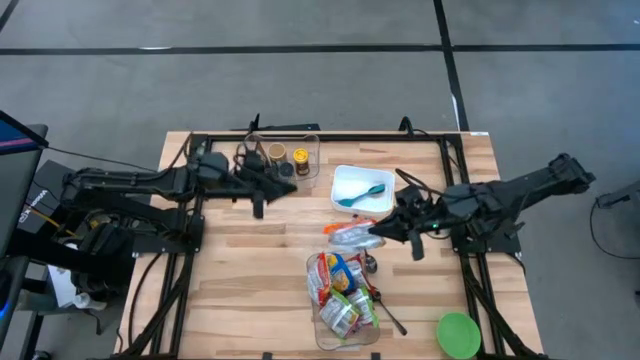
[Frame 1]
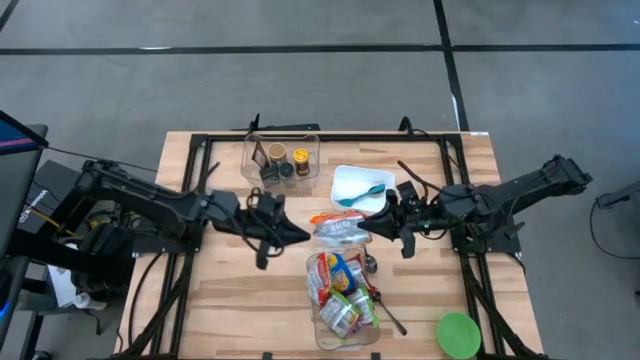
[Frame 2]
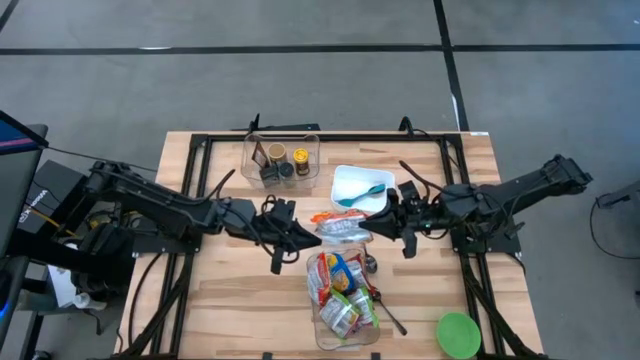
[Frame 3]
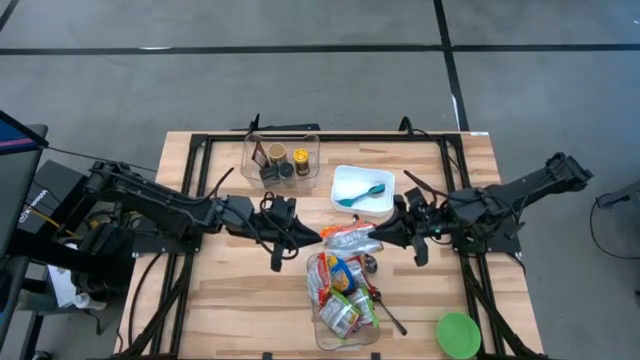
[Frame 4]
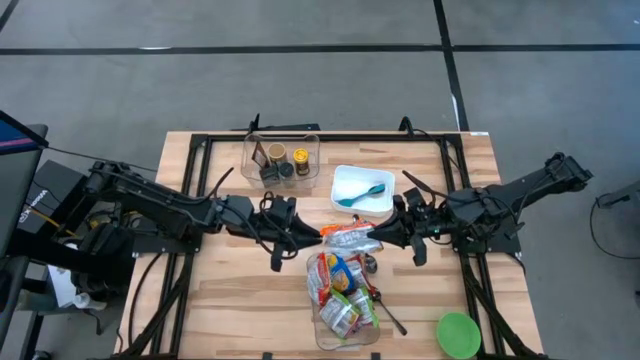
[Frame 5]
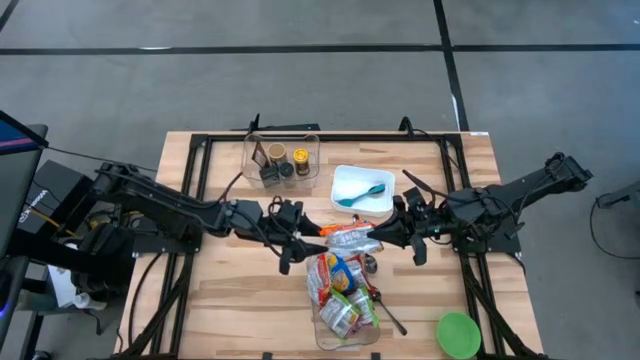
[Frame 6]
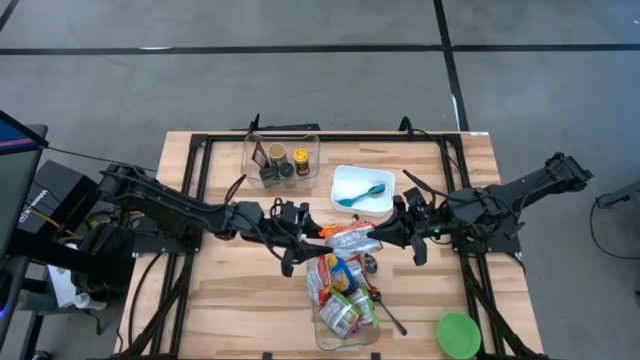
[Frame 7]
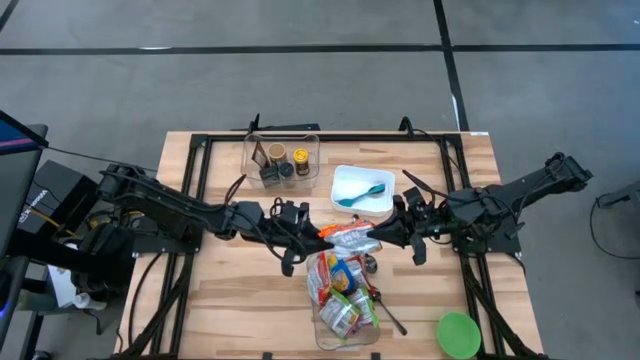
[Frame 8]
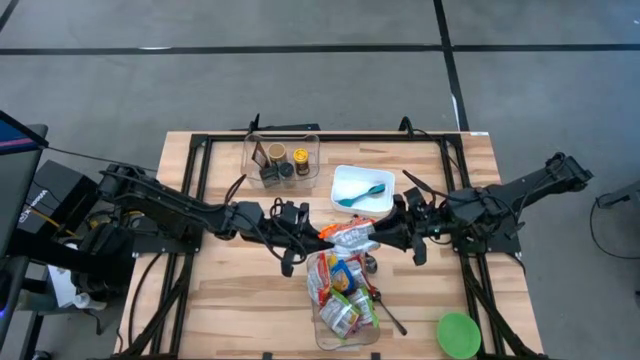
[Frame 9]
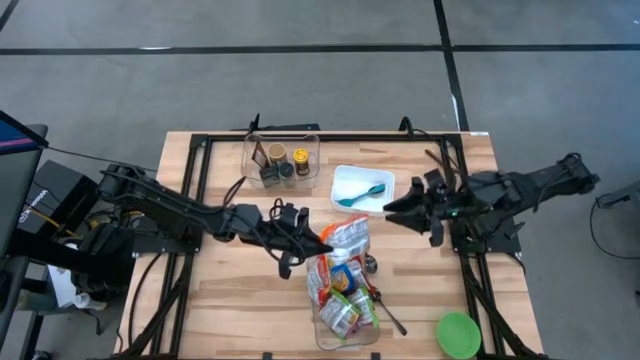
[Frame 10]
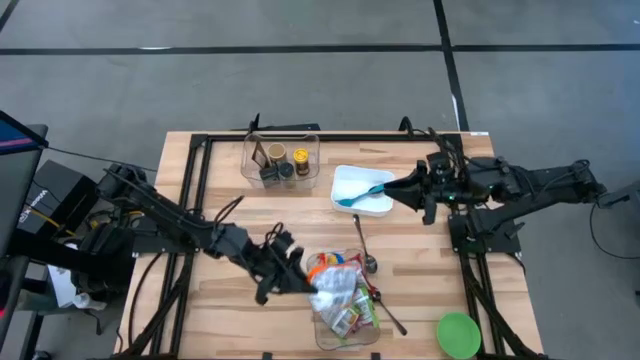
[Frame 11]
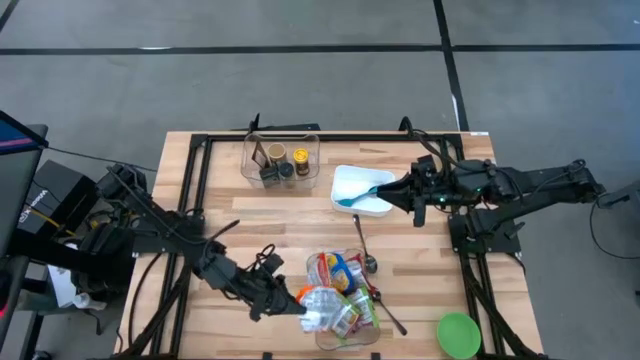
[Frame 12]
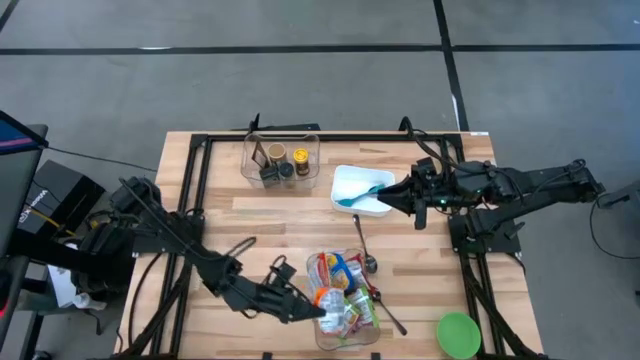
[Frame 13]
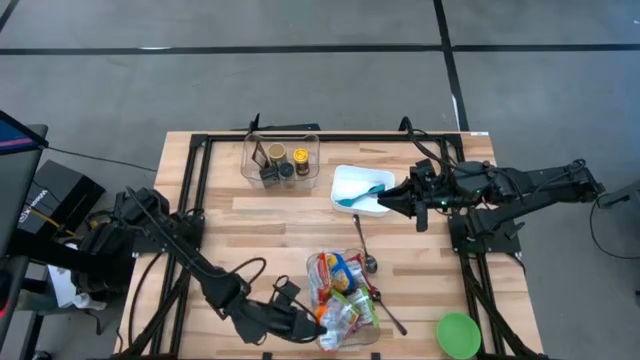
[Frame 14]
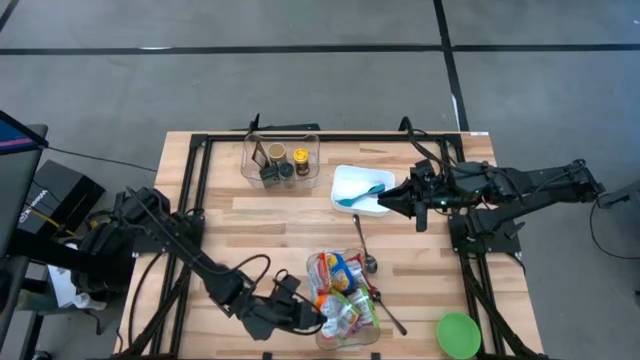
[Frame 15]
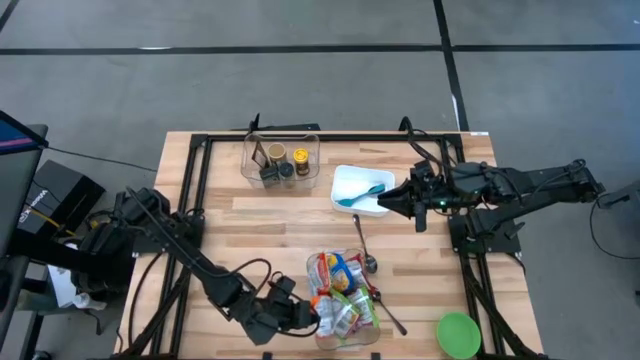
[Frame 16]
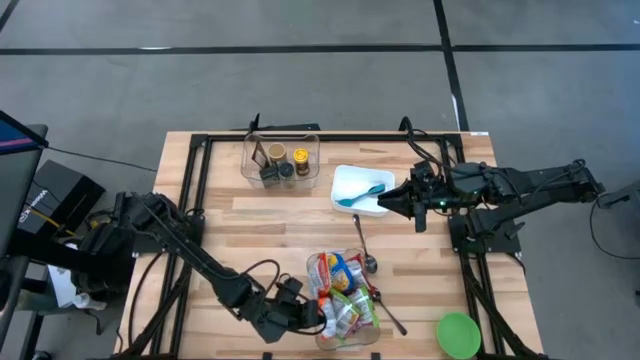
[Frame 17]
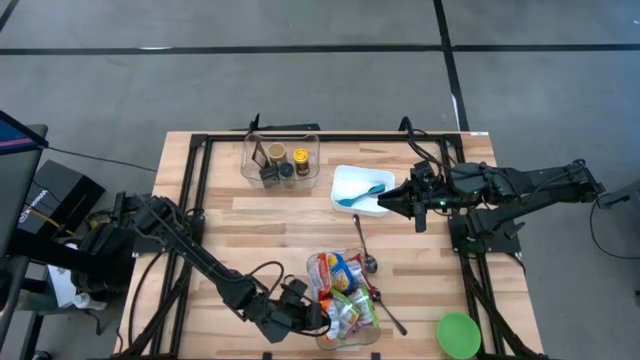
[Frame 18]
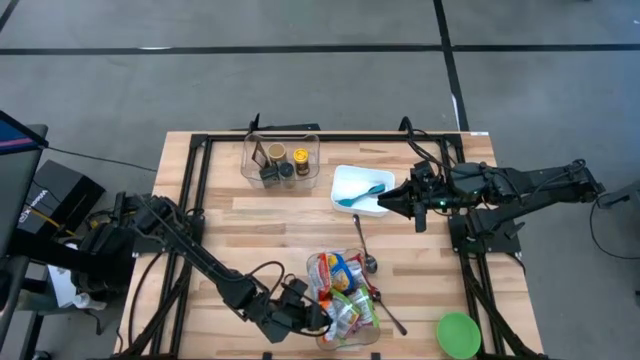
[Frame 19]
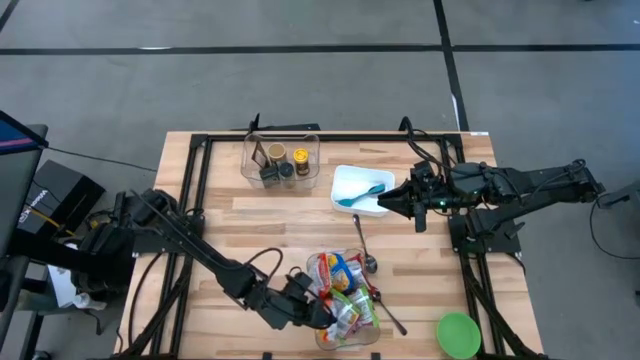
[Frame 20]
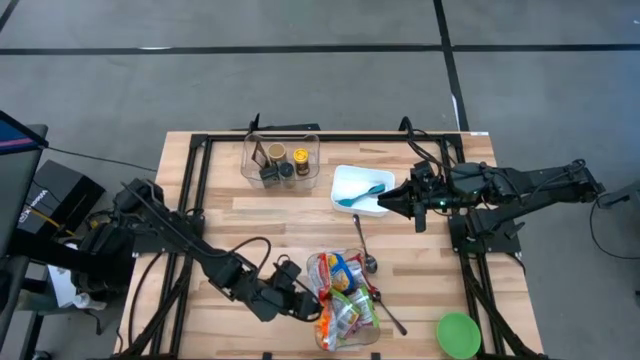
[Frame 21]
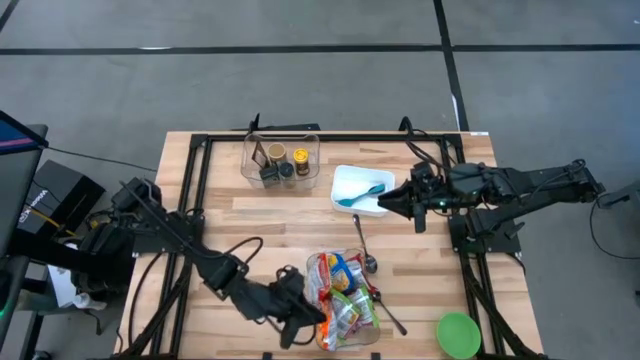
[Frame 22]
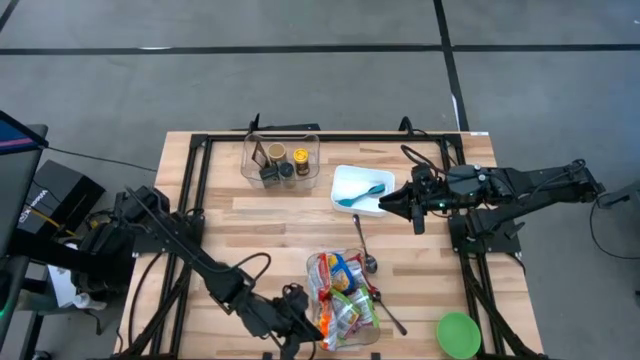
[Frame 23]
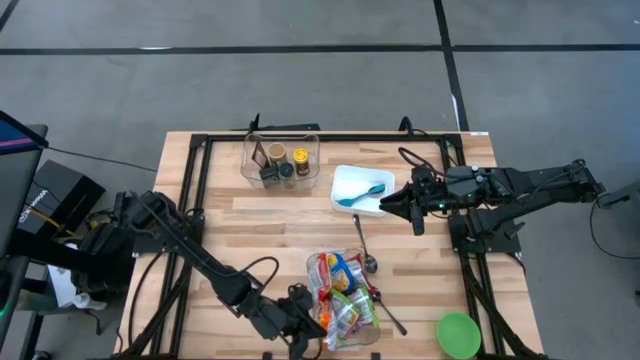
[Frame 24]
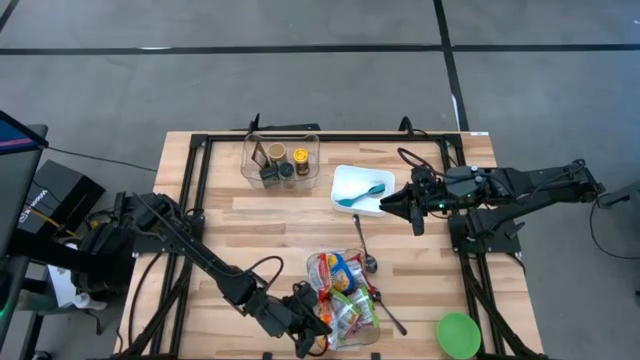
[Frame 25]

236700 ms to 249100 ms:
Task: Pick & Place Food Item
Put the orange noodle pack into the bottom transparent bin

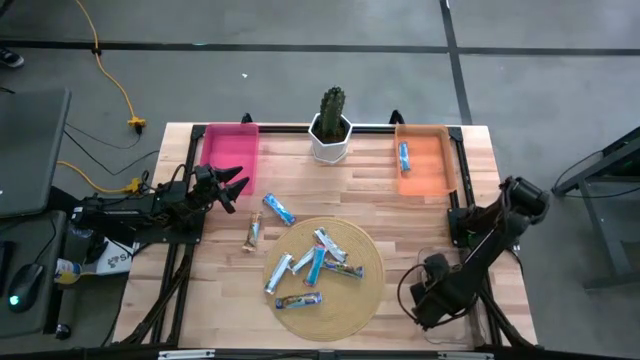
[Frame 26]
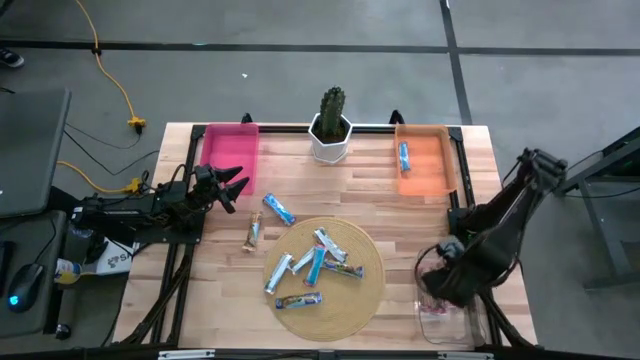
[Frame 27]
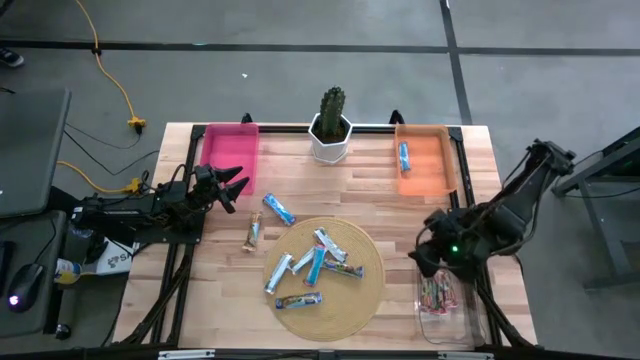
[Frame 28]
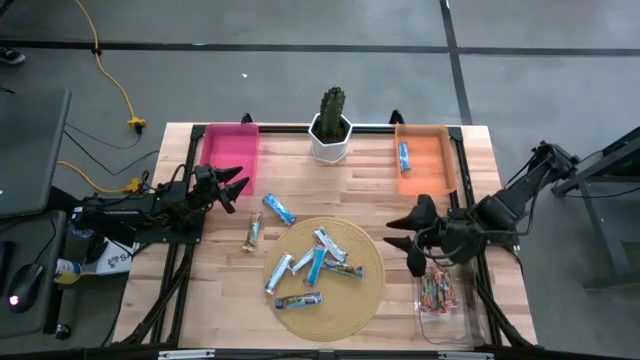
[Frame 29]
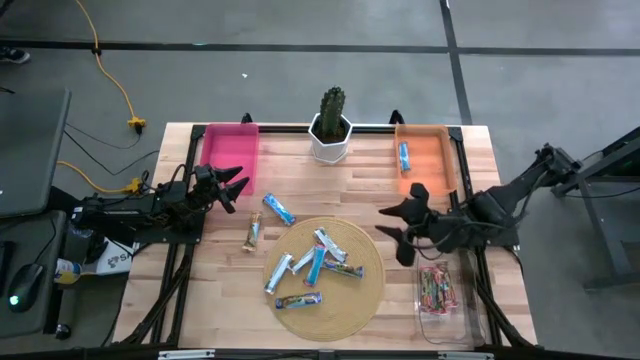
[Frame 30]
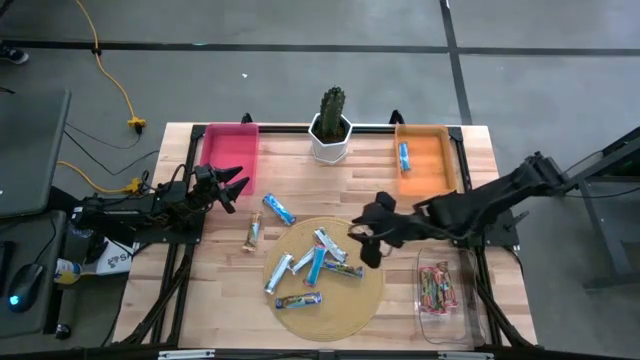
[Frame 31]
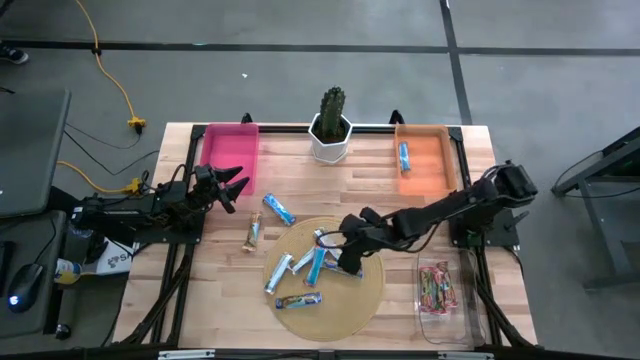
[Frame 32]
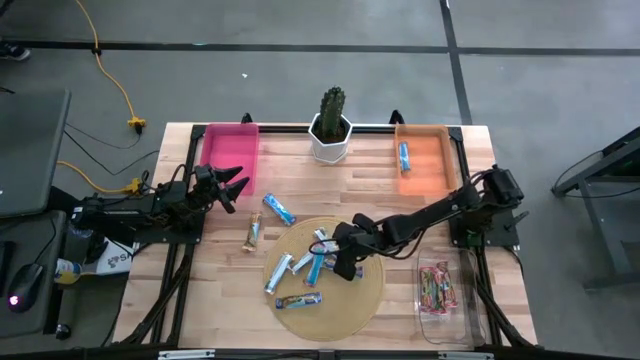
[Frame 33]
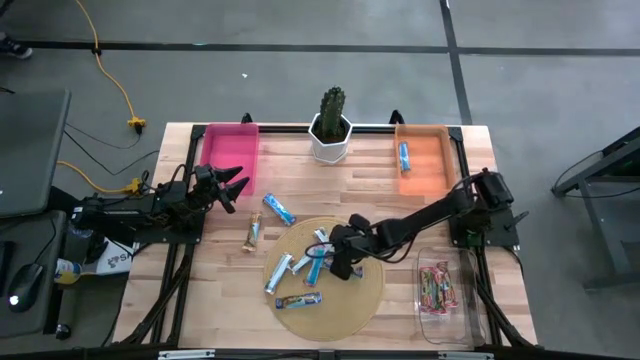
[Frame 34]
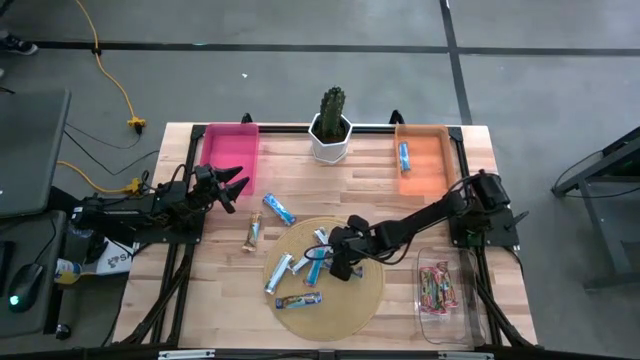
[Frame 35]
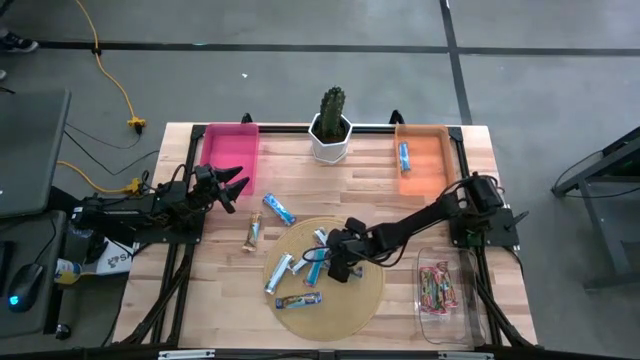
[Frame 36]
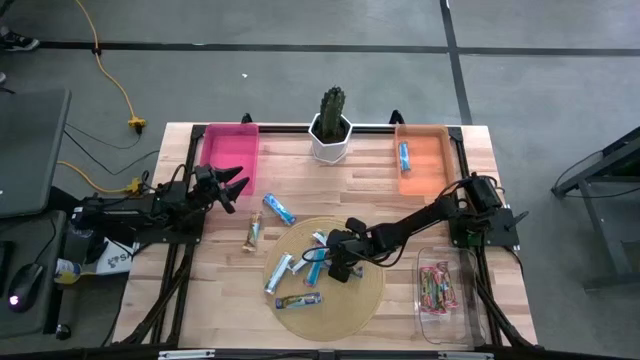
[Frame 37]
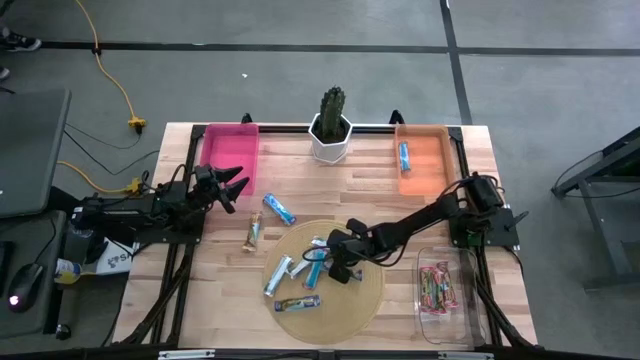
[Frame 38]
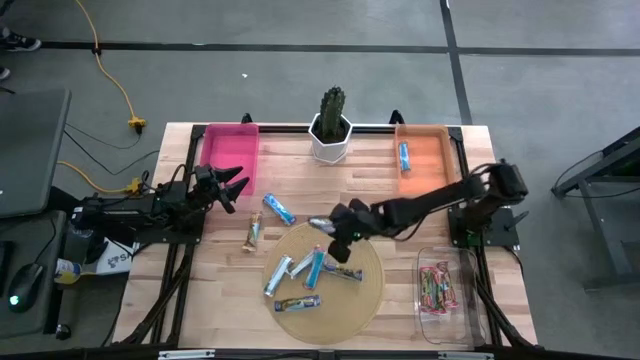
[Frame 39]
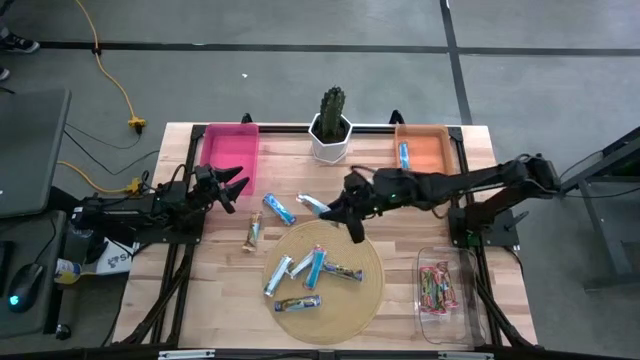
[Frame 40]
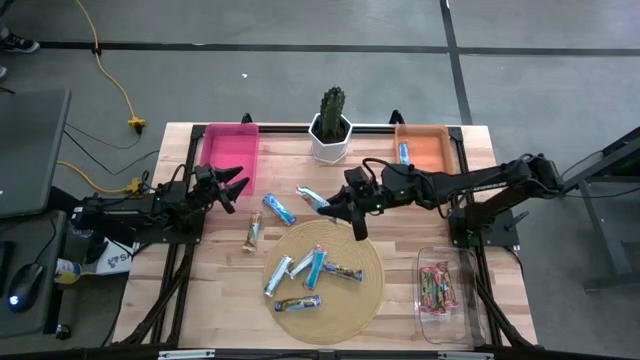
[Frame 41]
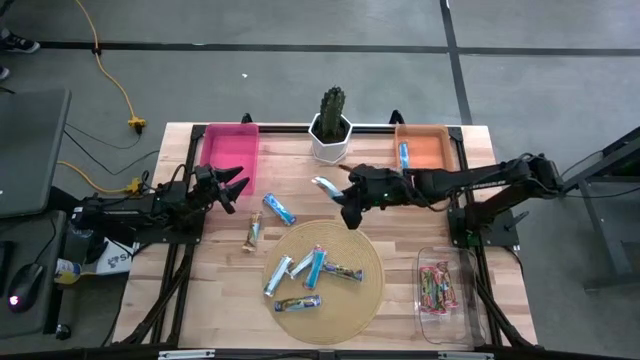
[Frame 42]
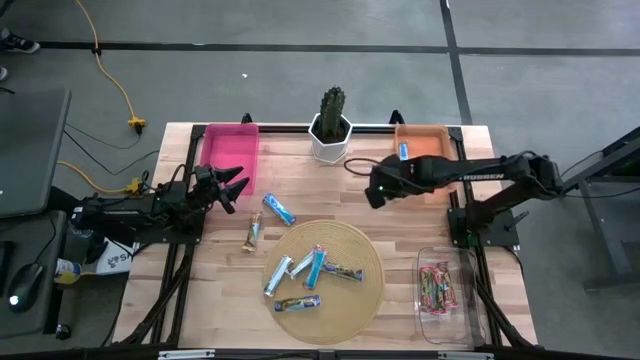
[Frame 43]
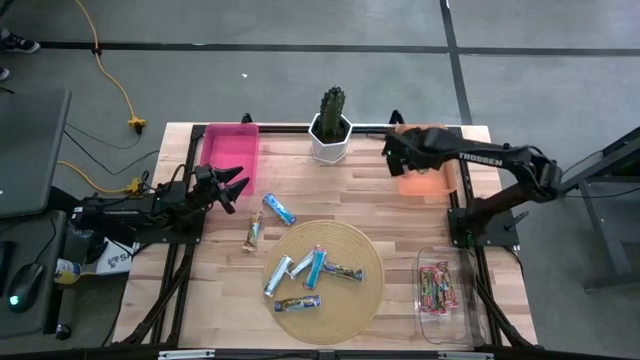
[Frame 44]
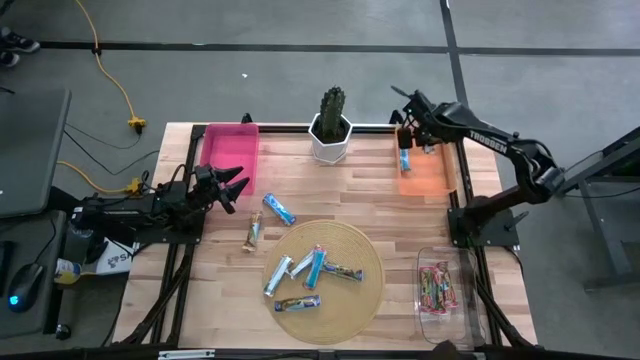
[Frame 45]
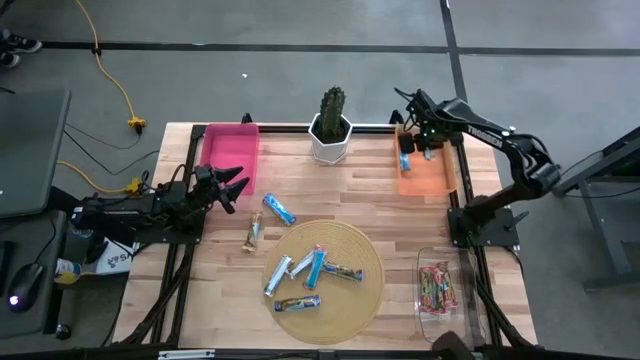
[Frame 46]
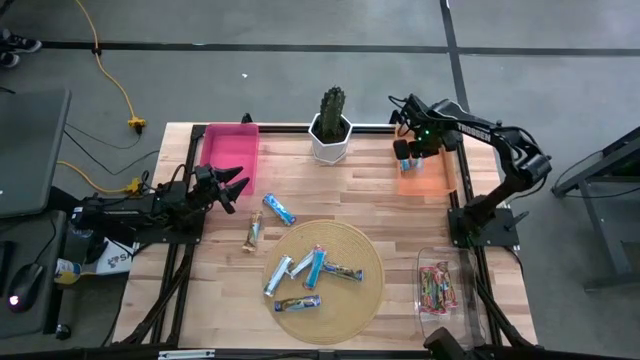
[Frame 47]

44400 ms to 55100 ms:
Task: Pick and place Granola Bars by type
Put the yellow granola bar into the orange bin
